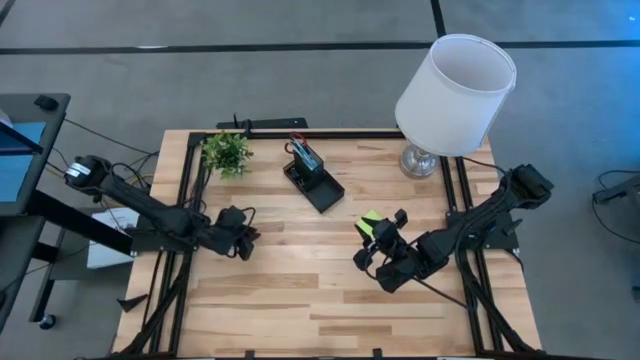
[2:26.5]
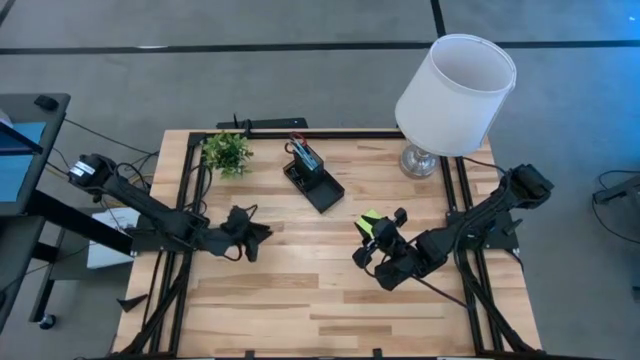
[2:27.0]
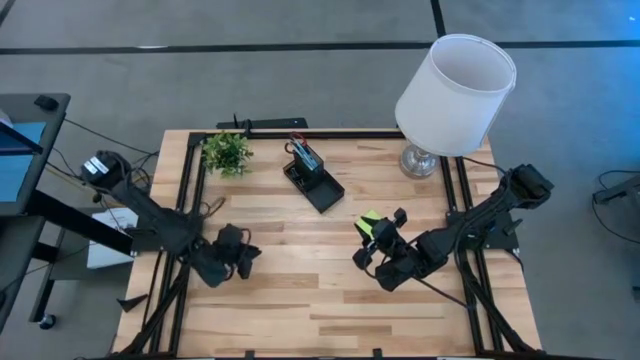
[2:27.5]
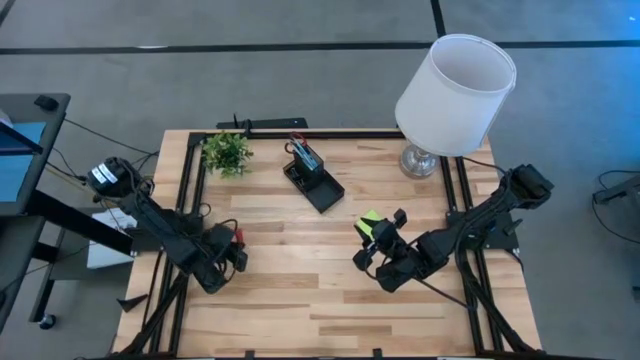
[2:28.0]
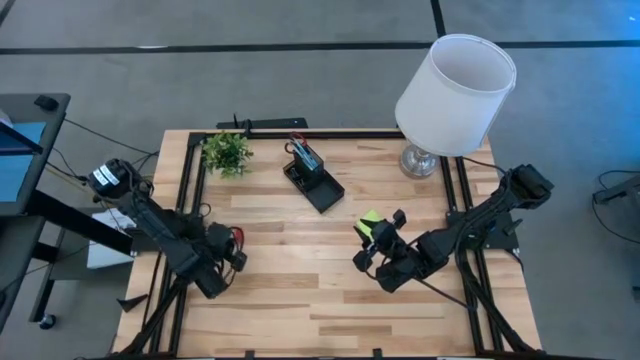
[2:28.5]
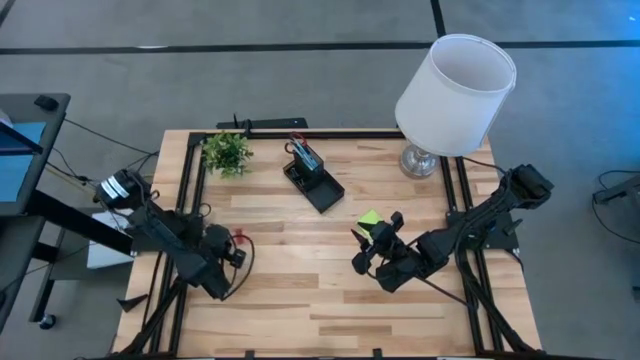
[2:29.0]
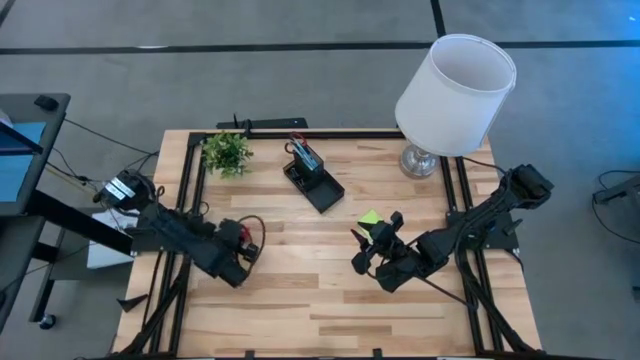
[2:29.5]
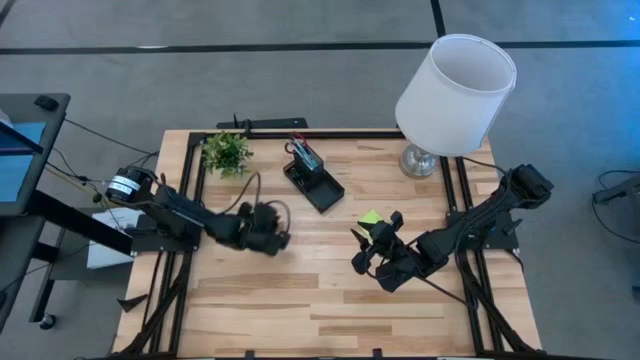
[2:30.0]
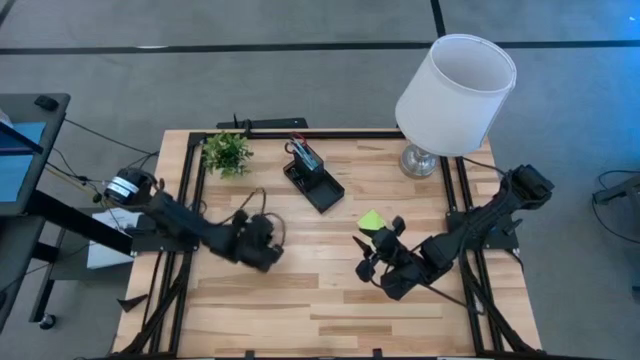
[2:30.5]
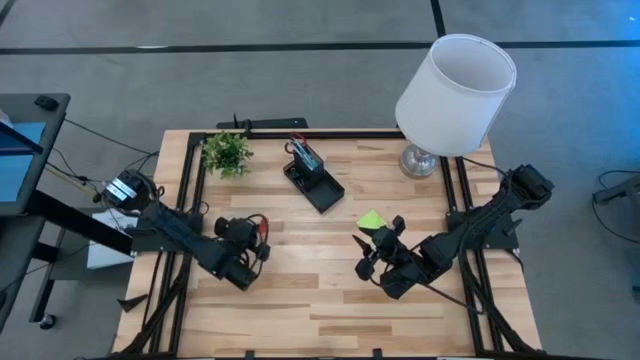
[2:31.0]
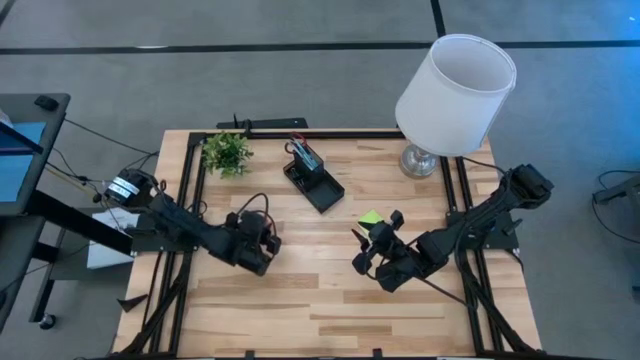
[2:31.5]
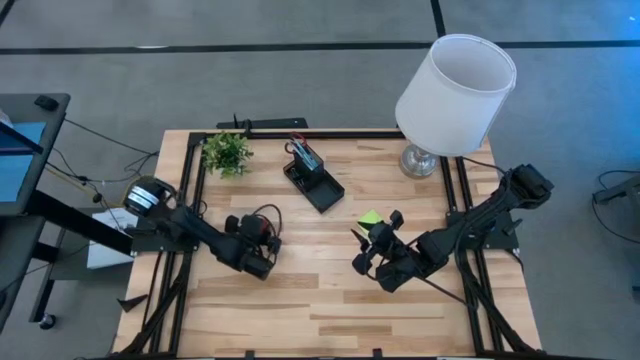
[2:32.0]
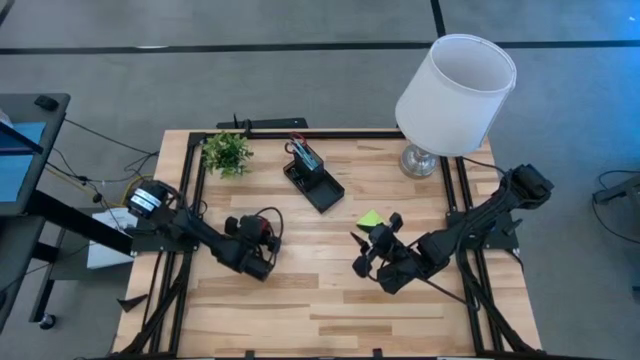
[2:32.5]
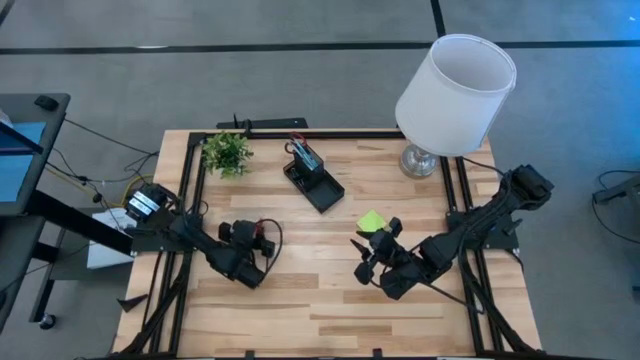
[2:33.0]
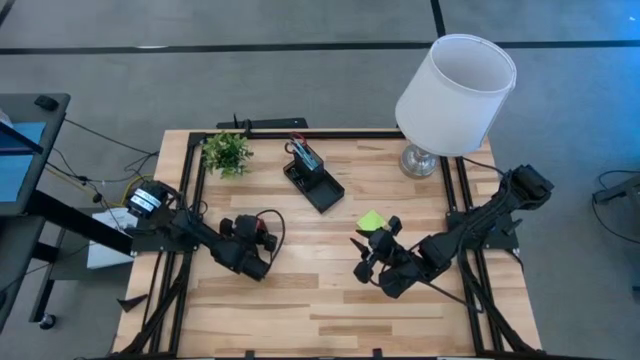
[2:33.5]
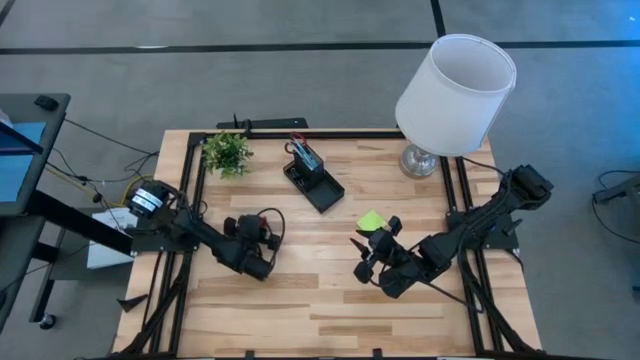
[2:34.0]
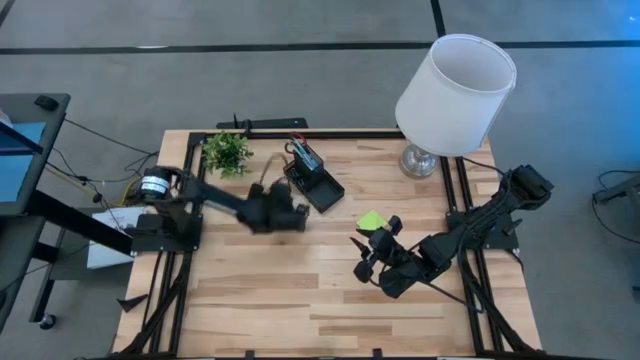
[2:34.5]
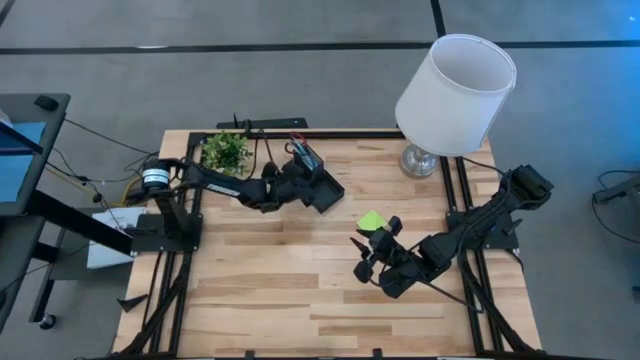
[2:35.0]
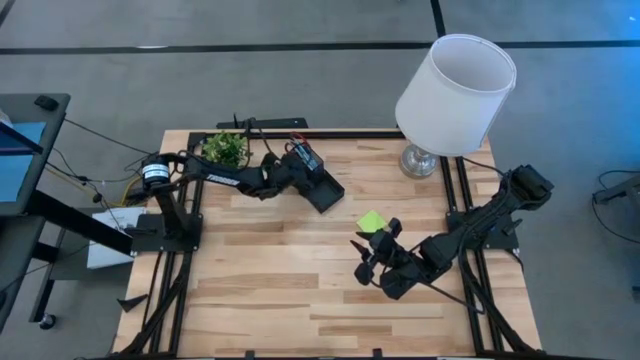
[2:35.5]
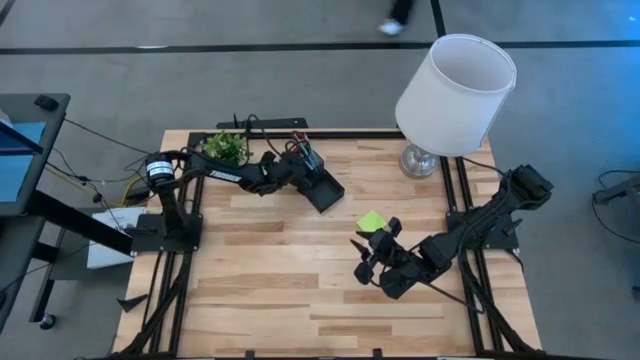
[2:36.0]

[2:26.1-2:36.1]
Task: Pick and place office supplies into organizer
Put the red eraser into the desk organizer

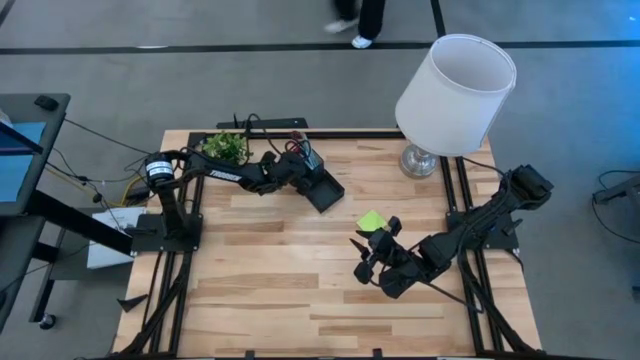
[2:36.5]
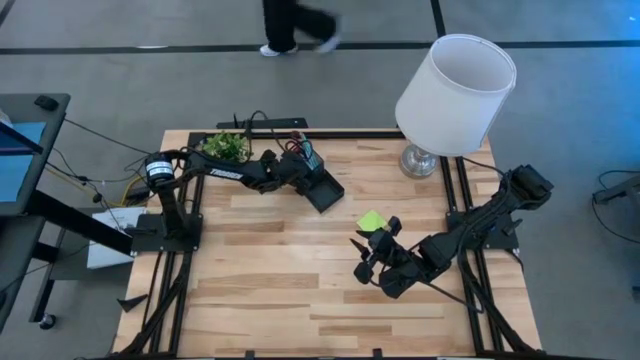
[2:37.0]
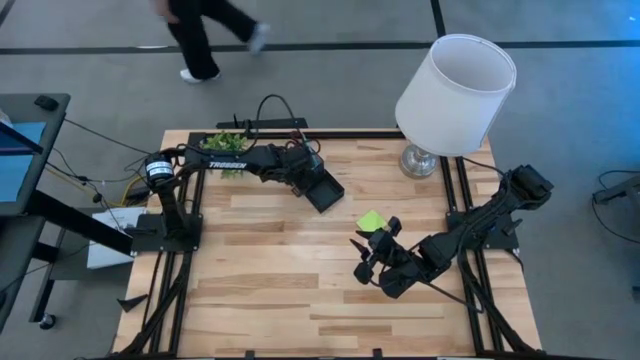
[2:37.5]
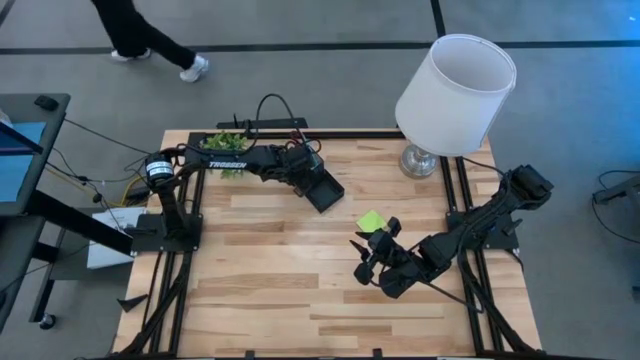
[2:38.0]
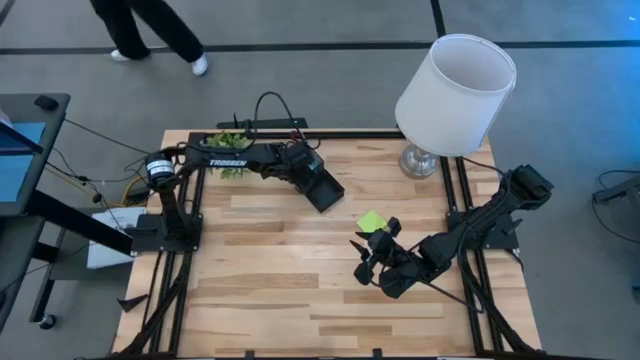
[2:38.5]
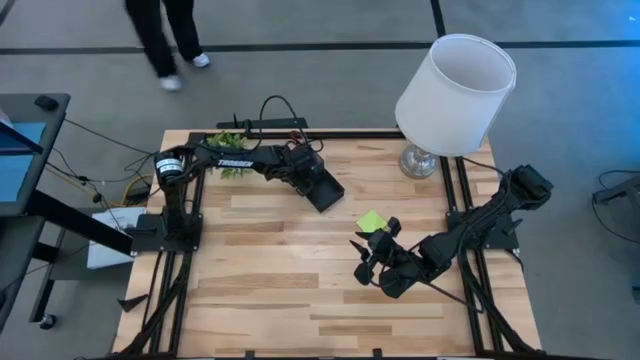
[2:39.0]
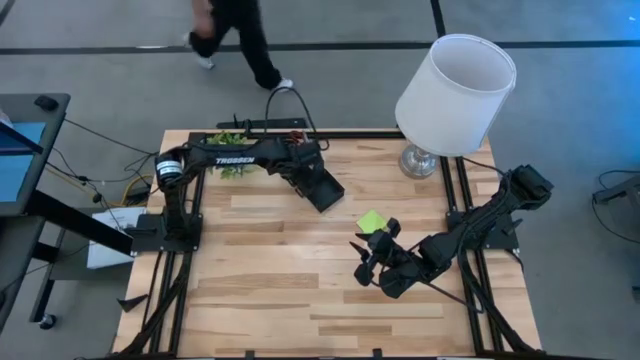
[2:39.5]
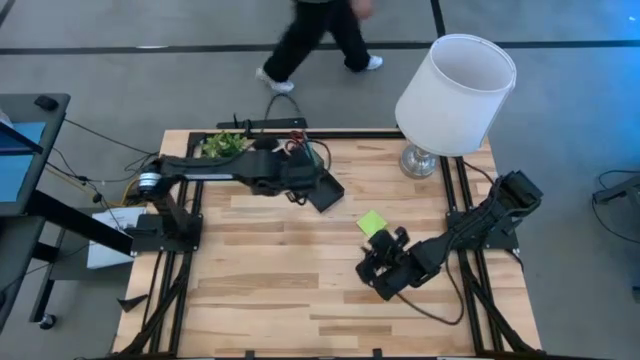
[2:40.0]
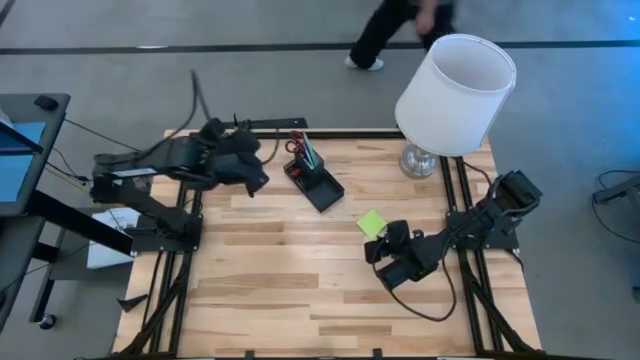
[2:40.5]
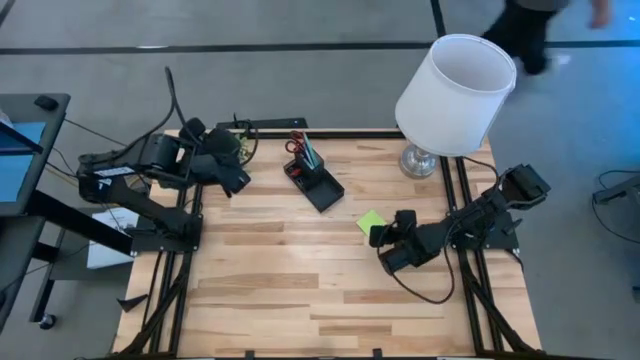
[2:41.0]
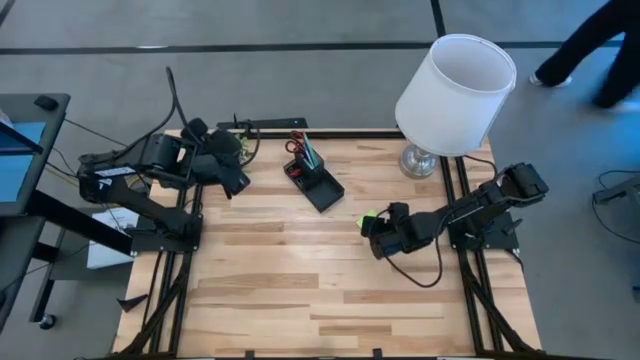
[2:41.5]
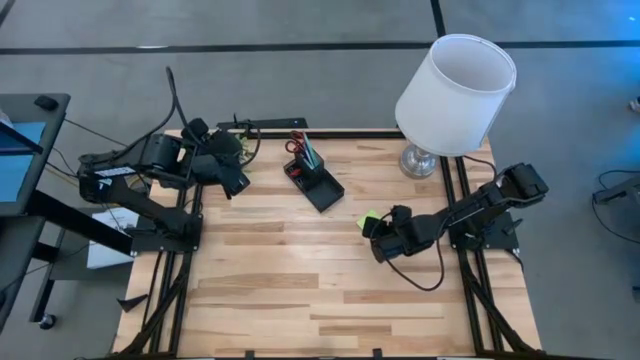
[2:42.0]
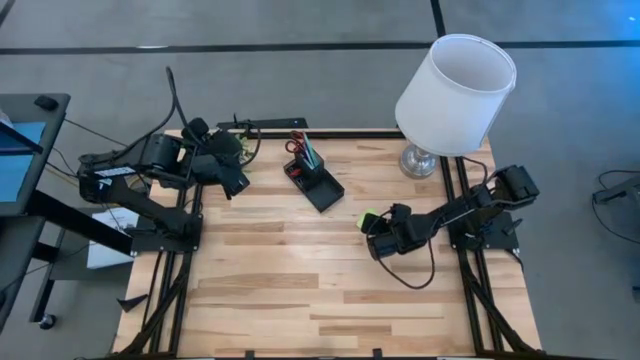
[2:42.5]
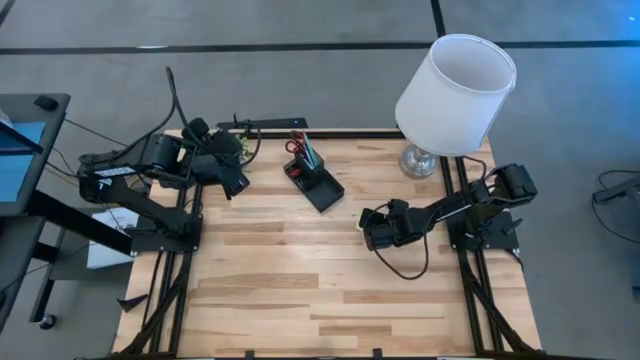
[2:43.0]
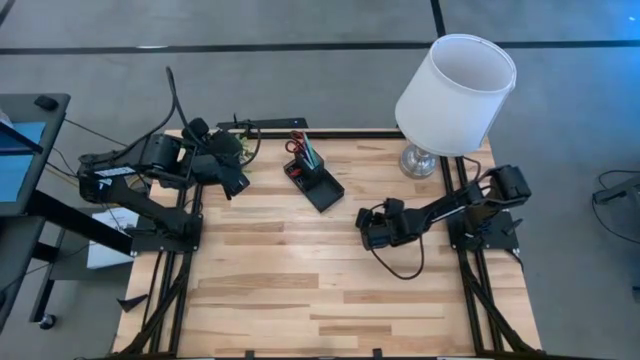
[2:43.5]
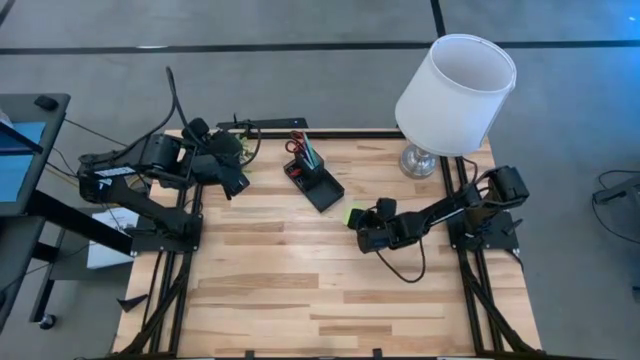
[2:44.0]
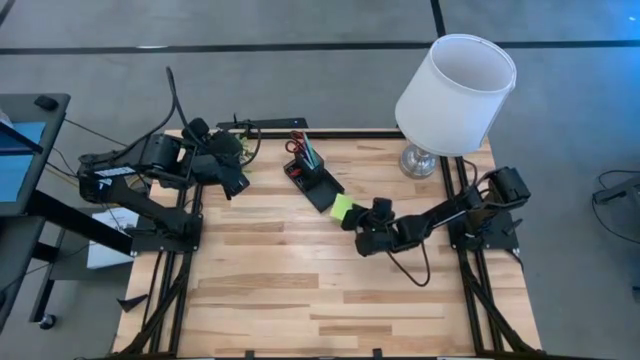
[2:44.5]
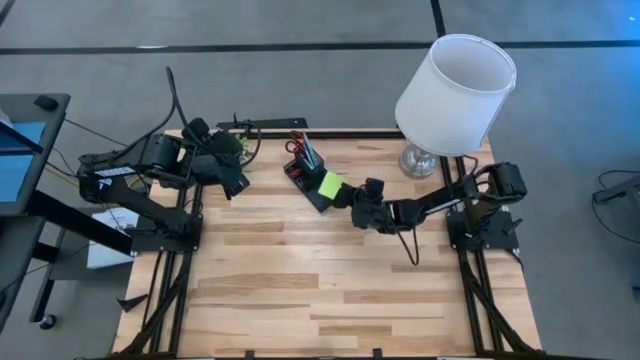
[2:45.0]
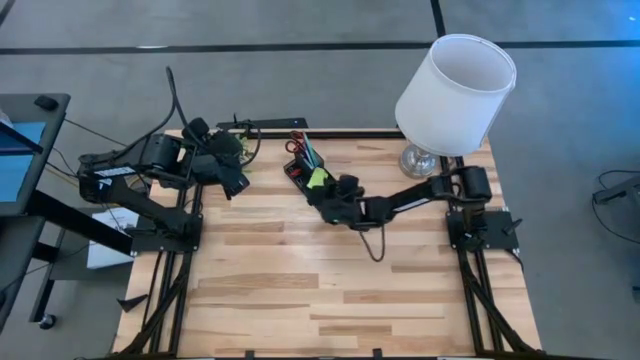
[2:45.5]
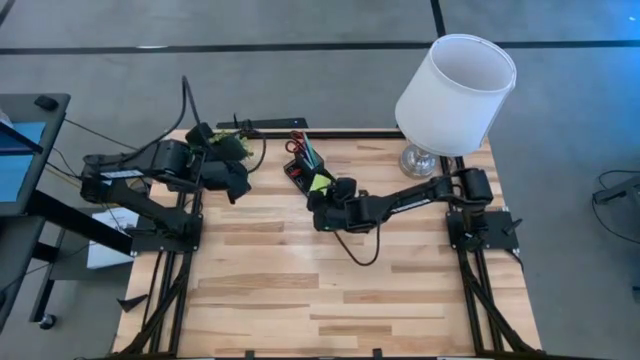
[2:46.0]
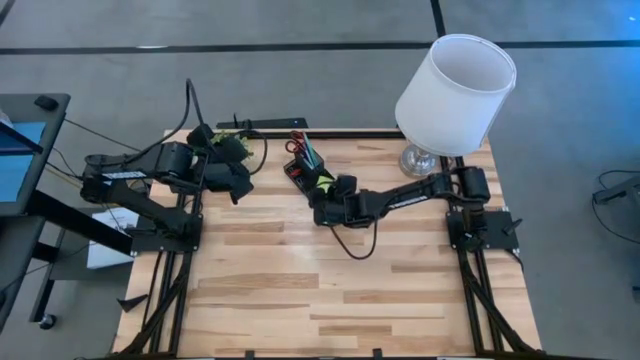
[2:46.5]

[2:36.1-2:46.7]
Put the green sticky notes into the desk organizer
